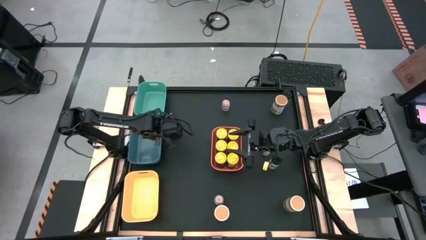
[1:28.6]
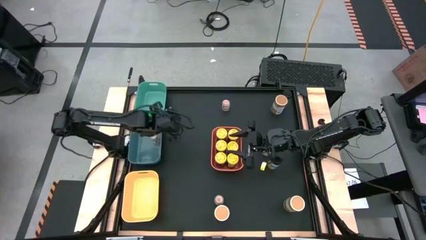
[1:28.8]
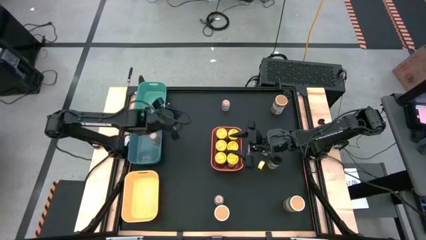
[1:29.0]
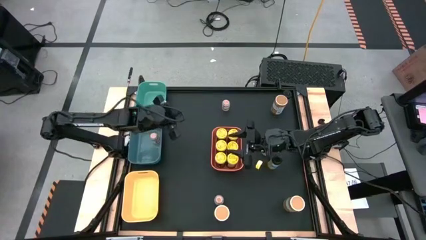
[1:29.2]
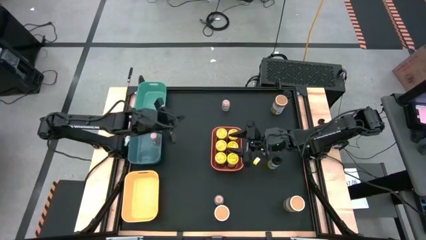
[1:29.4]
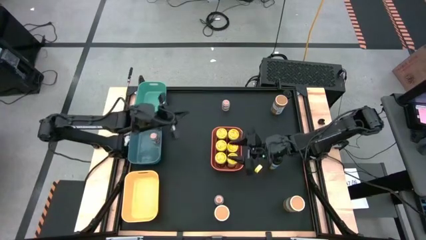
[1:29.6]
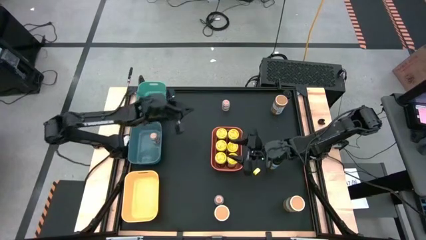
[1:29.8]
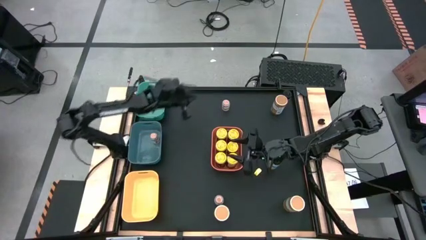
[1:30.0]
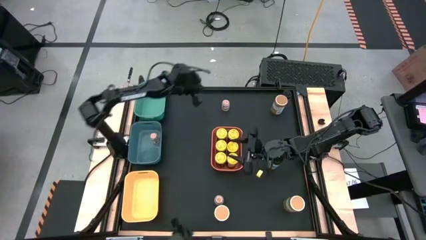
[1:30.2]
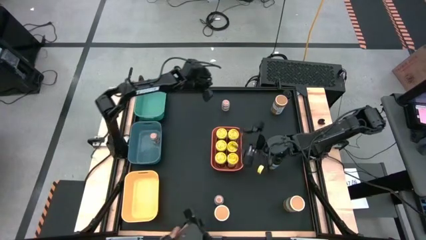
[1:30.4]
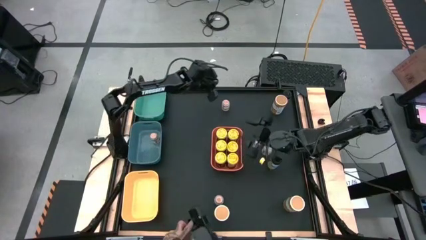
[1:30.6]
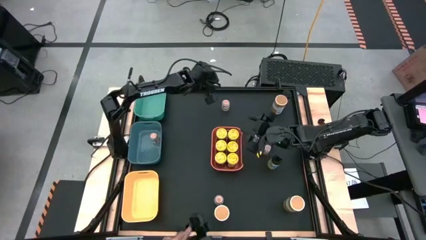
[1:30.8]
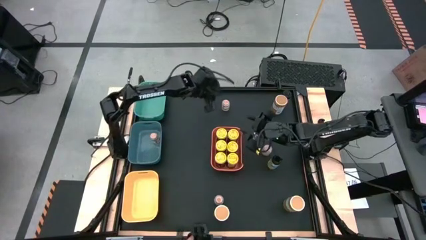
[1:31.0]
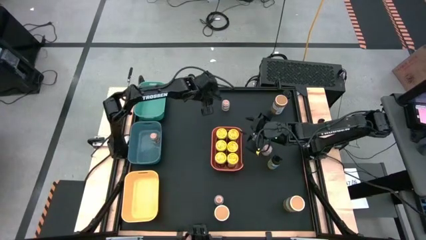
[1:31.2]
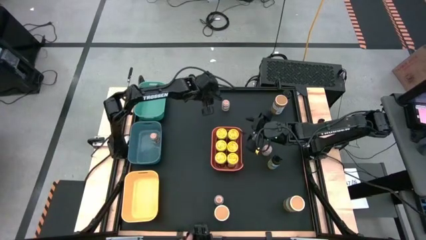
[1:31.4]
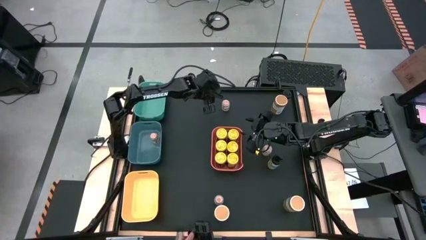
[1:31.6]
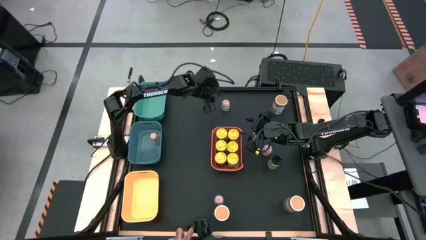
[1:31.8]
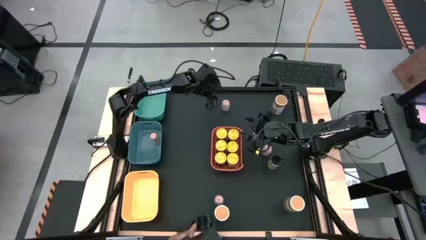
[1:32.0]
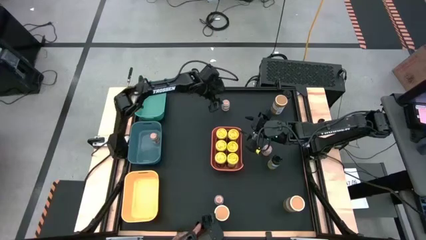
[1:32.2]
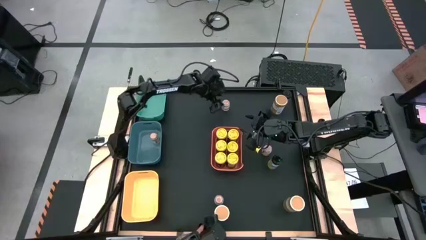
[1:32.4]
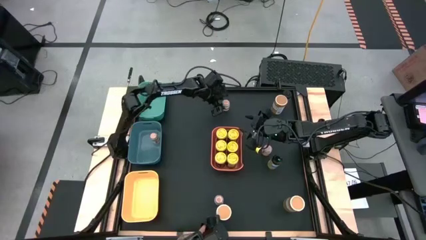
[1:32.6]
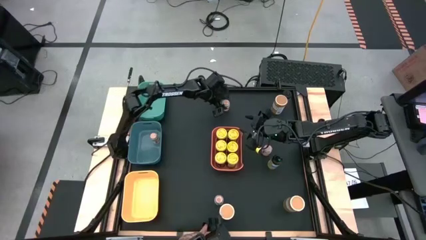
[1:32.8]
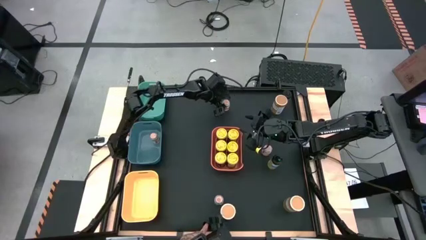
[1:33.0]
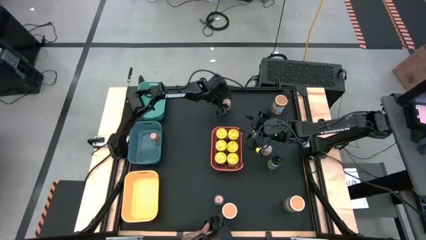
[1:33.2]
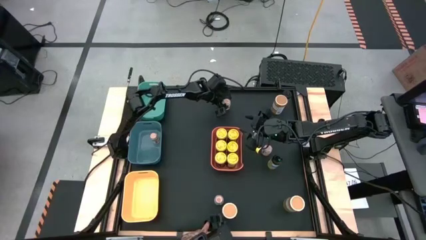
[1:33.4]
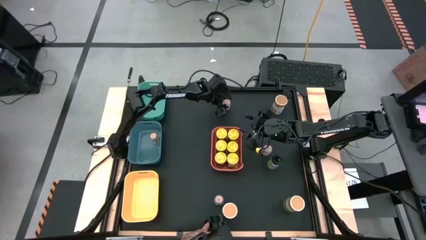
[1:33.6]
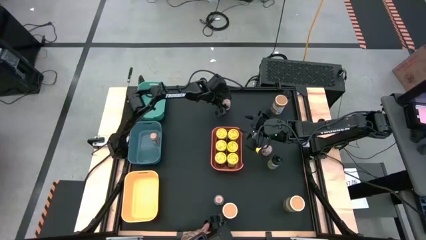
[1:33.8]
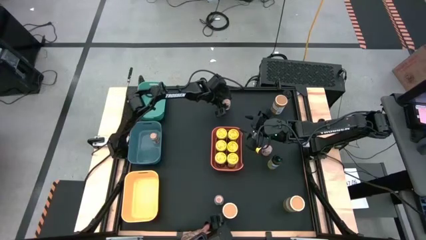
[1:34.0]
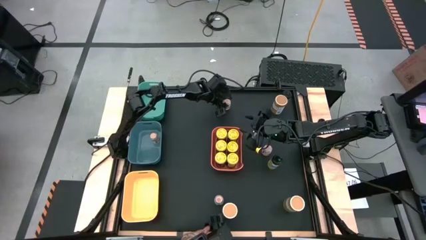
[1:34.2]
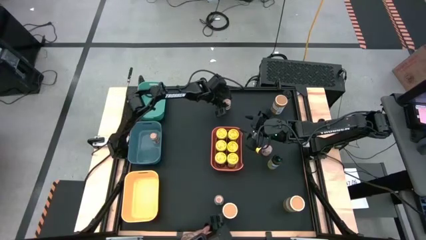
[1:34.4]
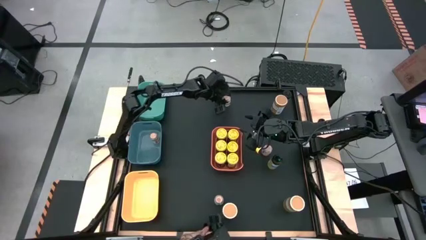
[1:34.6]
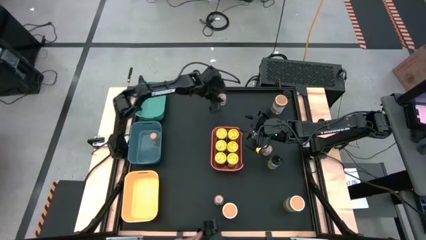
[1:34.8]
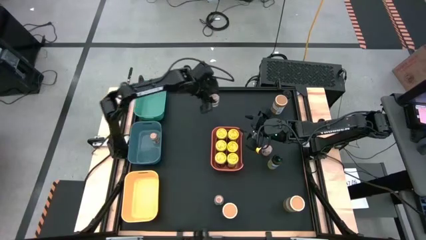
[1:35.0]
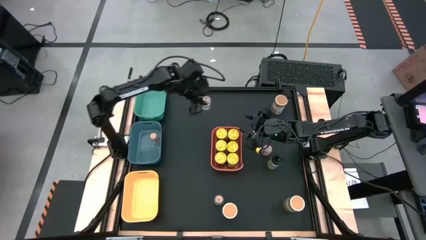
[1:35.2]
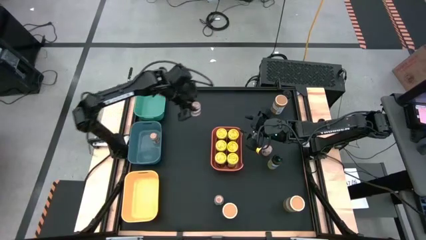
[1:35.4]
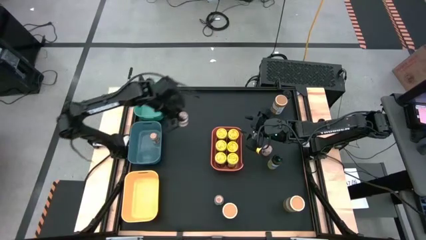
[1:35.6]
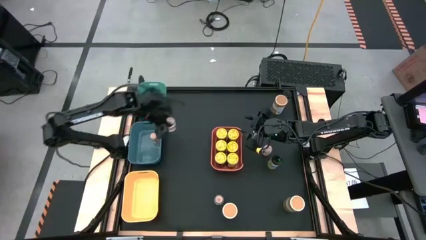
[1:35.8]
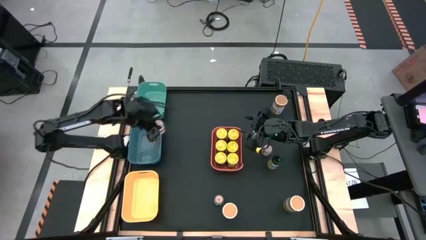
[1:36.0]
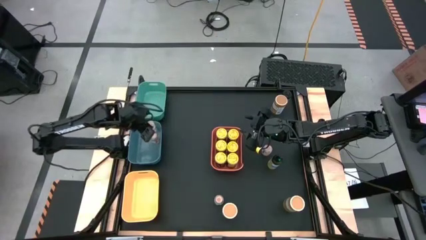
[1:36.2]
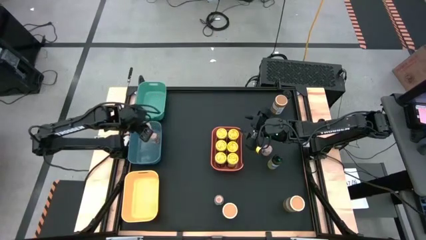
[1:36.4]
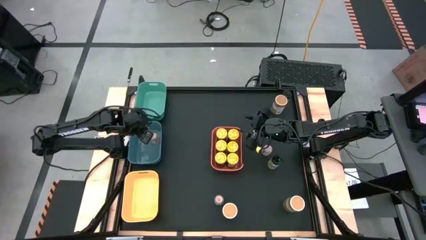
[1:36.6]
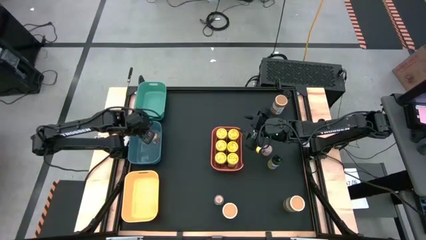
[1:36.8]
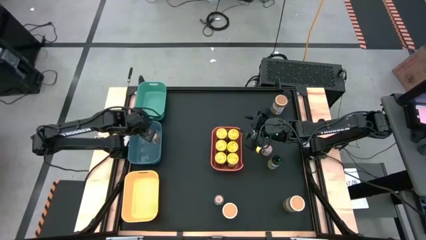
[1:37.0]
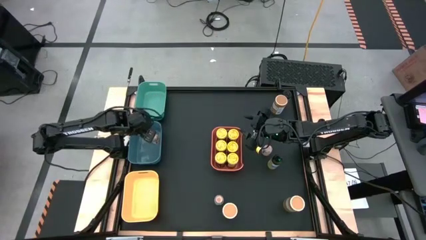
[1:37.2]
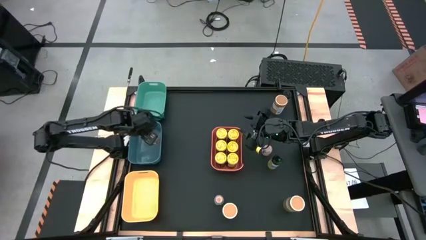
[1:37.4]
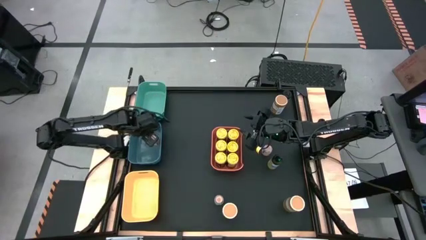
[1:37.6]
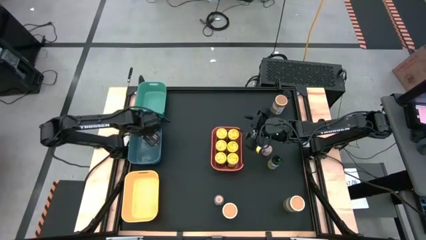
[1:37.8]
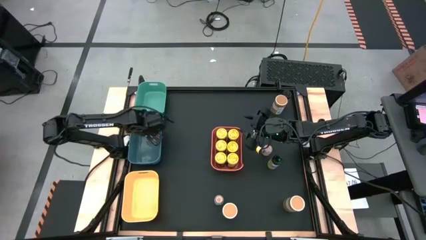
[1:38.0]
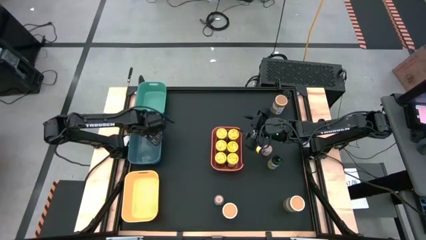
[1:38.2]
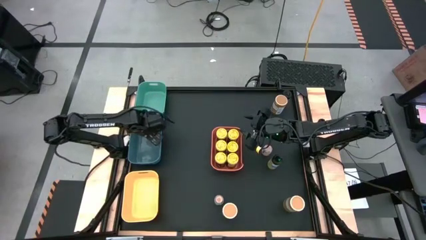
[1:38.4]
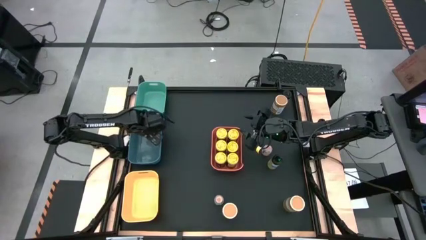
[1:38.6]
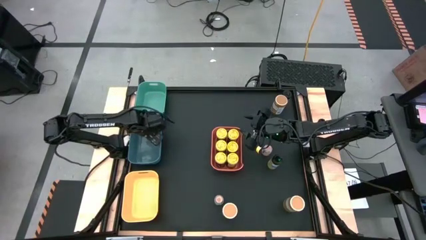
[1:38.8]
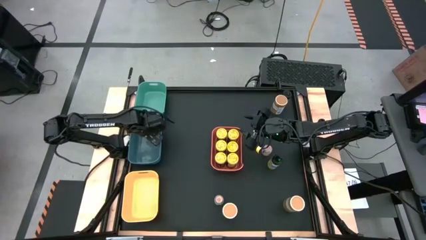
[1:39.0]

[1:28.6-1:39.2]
Task: Sort spices by type
Put the brown seasoning bottle in the blue bin
